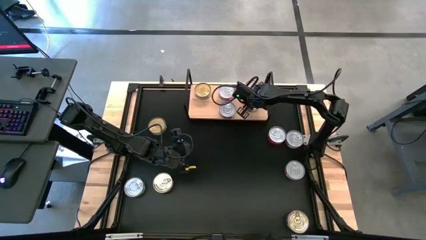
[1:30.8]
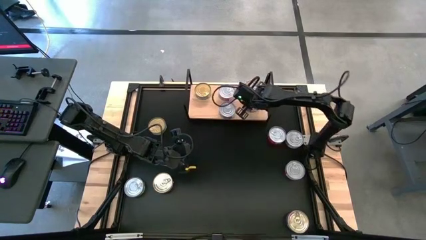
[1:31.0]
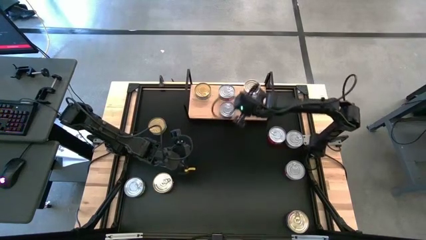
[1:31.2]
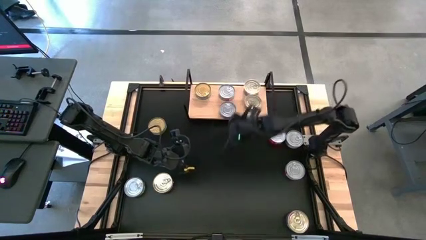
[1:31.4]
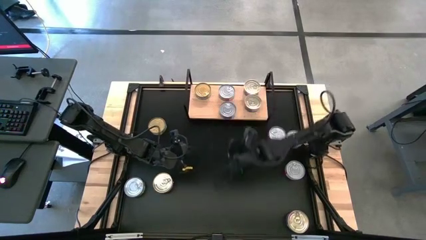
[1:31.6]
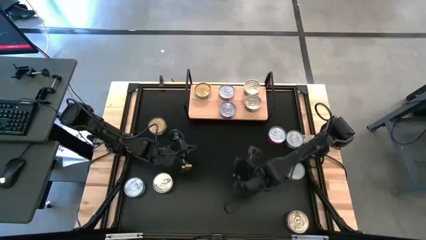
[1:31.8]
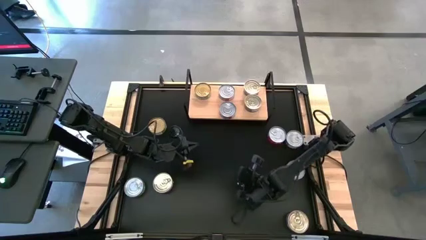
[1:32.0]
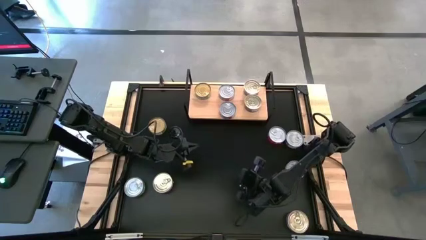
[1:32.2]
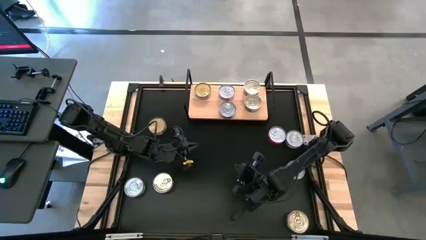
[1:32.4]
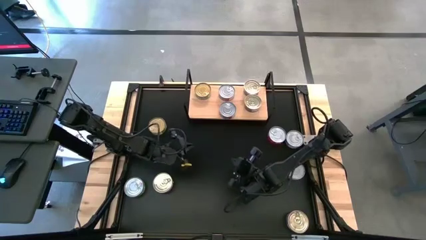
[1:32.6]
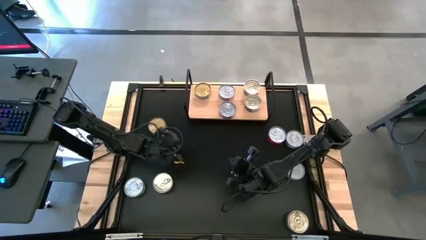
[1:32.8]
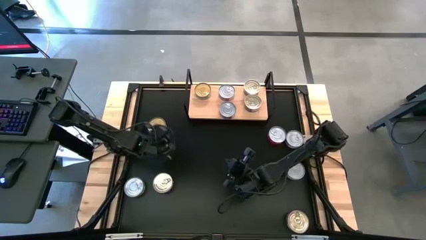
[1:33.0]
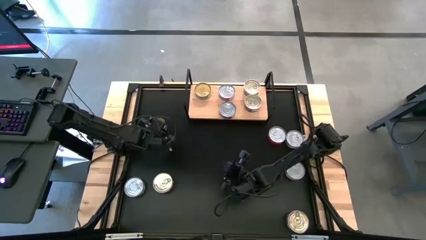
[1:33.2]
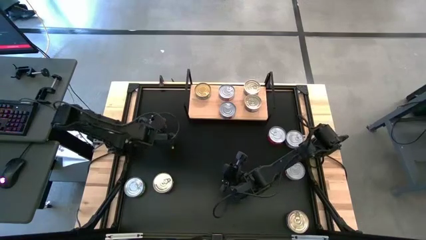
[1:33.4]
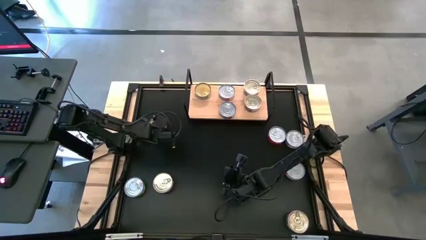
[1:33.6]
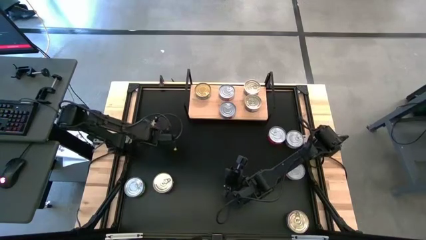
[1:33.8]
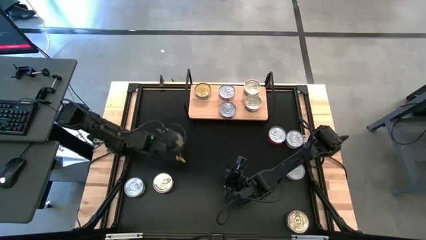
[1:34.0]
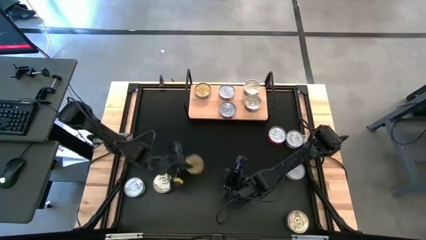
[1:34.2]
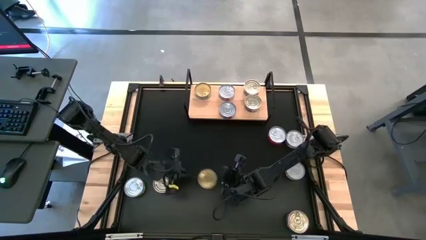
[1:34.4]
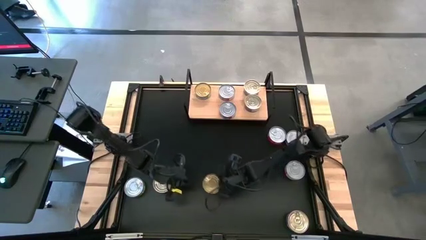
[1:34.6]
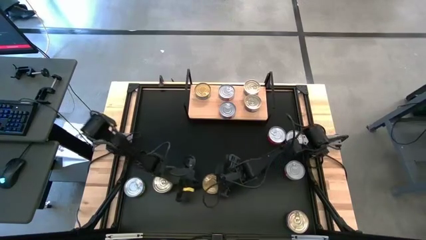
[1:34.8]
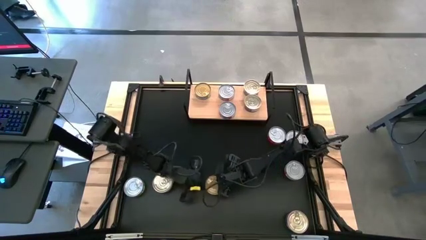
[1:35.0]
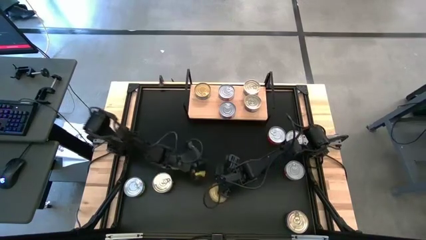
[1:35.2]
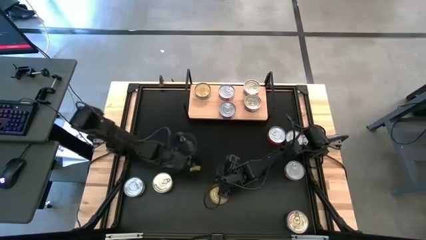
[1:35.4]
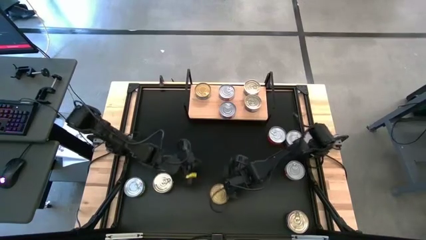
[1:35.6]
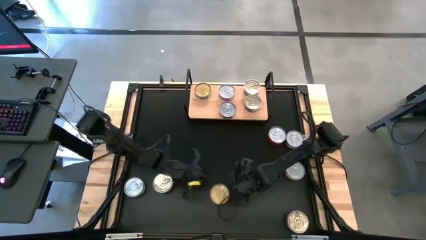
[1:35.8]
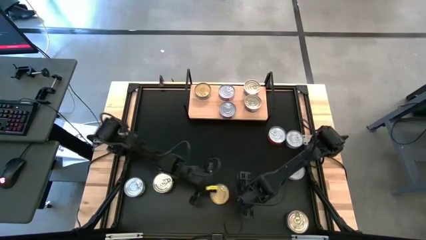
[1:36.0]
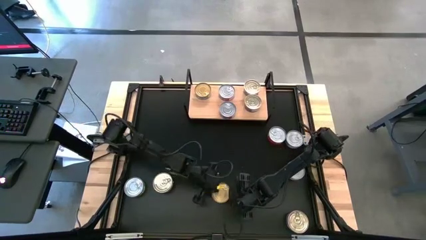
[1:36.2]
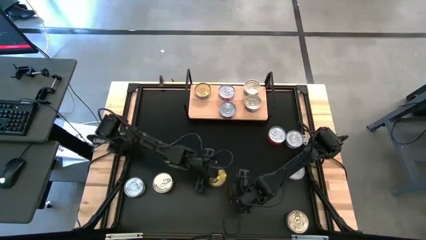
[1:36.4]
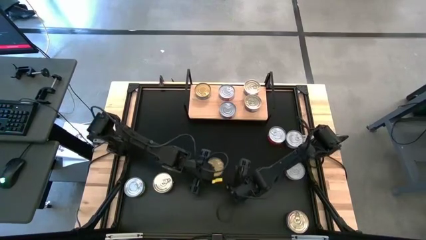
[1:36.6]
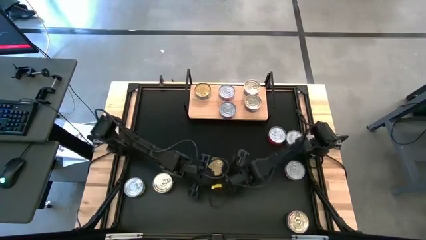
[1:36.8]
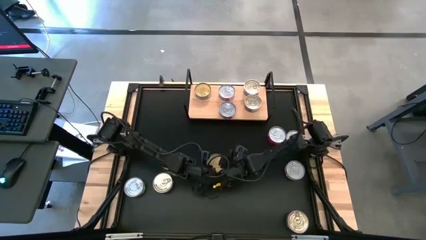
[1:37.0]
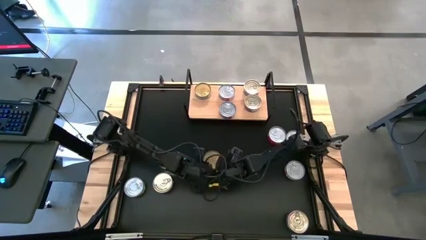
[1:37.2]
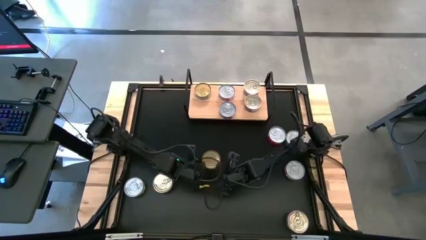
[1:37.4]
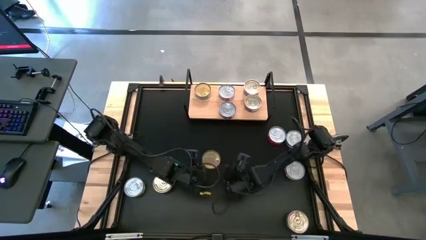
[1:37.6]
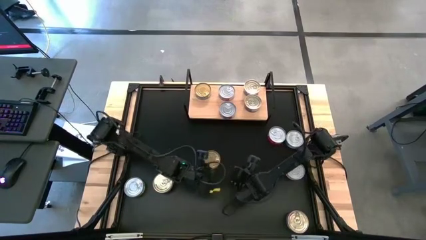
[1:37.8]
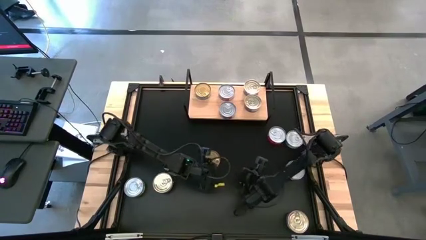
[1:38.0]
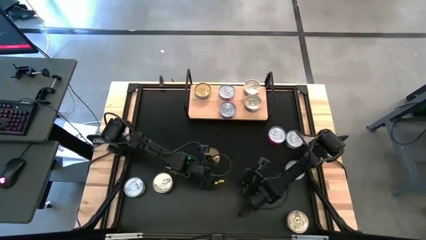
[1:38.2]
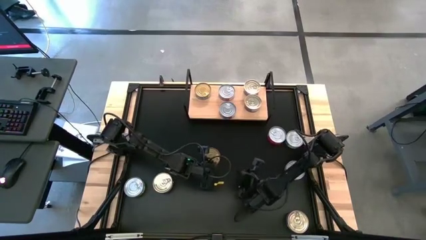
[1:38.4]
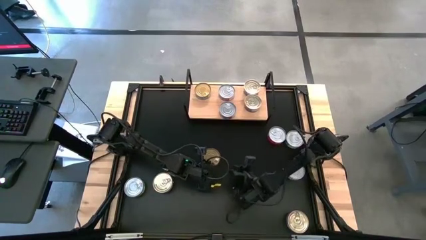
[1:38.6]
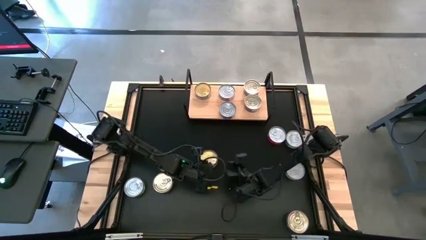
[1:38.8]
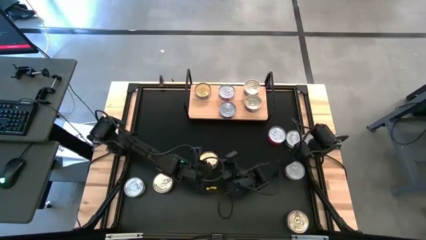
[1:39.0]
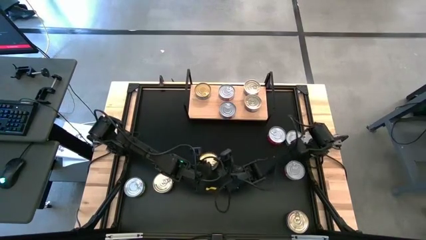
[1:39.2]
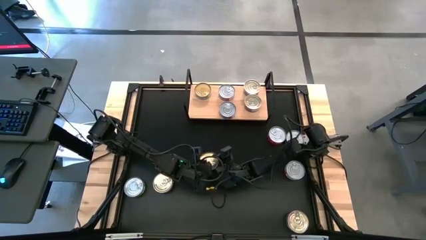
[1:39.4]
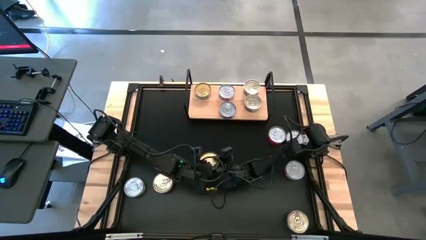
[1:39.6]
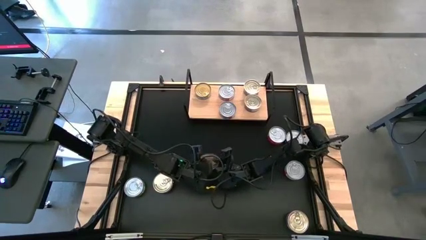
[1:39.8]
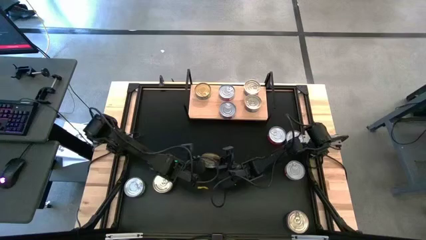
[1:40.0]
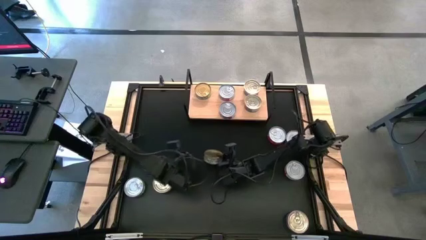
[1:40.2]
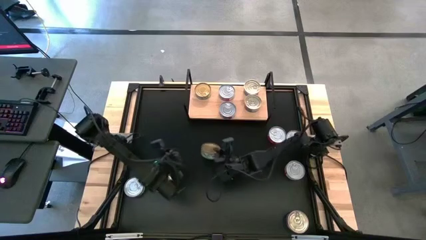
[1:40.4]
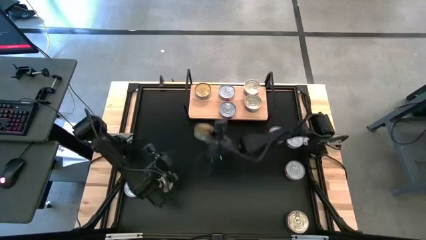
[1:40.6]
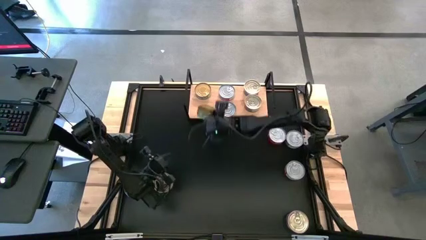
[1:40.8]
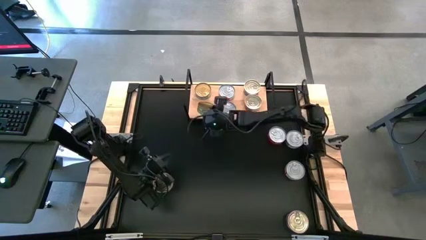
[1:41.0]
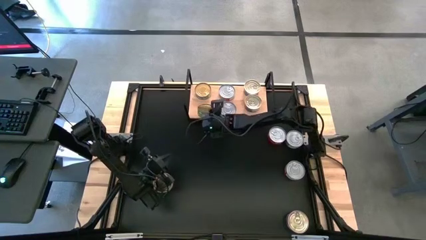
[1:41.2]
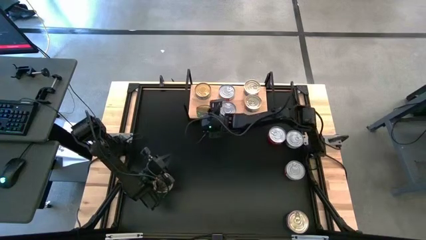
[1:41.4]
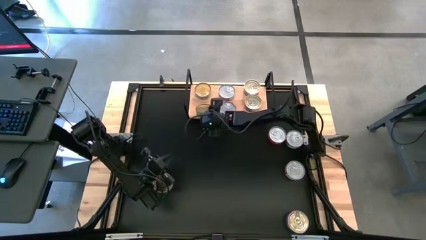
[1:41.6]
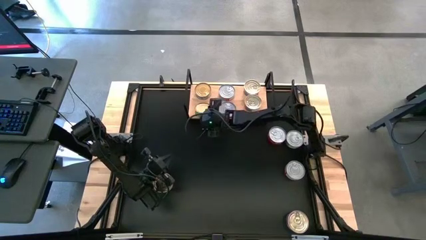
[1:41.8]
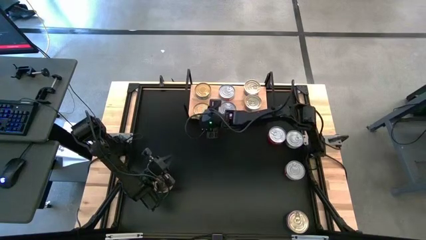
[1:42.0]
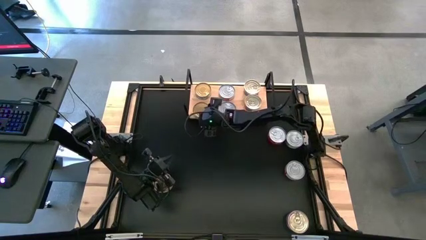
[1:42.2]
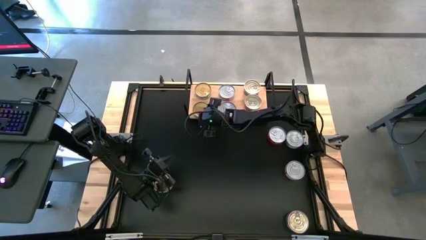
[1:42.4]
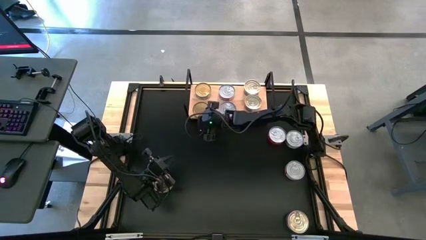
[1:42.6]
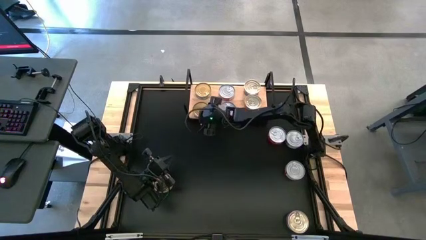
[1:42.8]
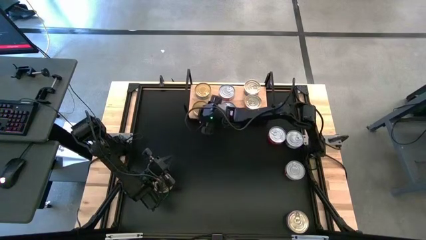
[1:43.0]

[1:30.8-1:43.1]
Task: Stack canned seafood by type on shelf
Align the green tuna can with the other green tuna can on the shelf
